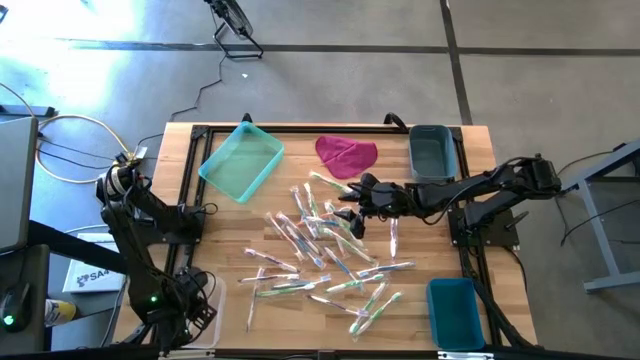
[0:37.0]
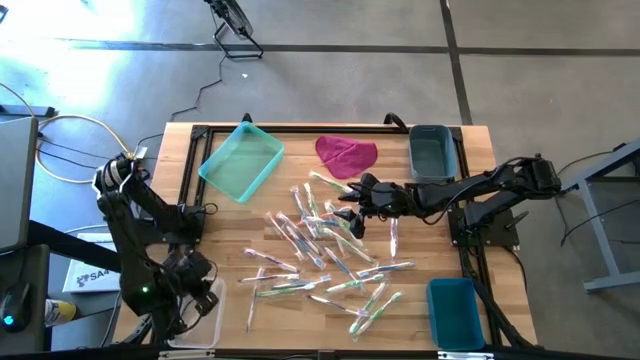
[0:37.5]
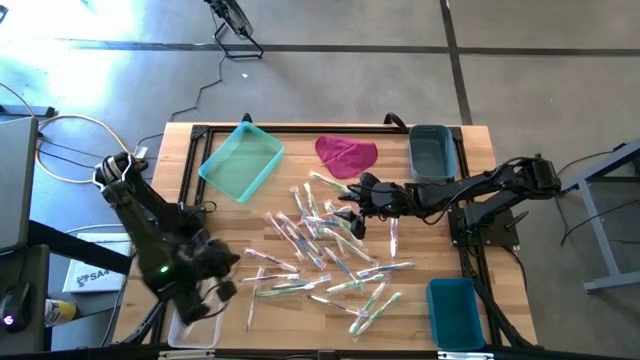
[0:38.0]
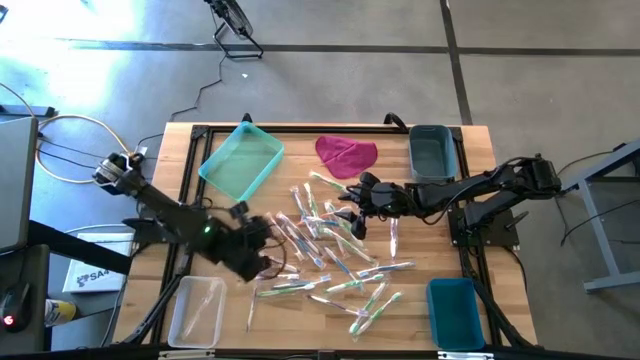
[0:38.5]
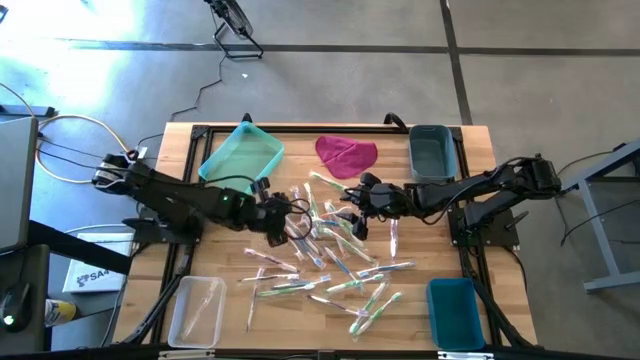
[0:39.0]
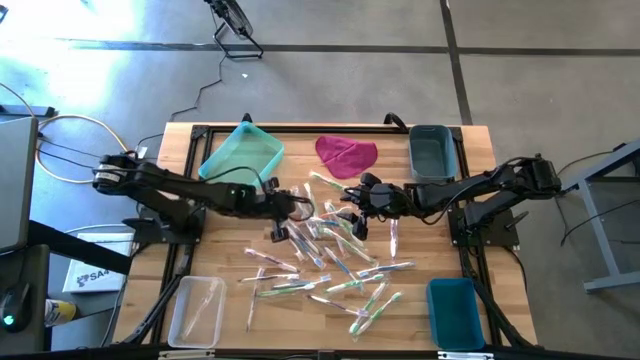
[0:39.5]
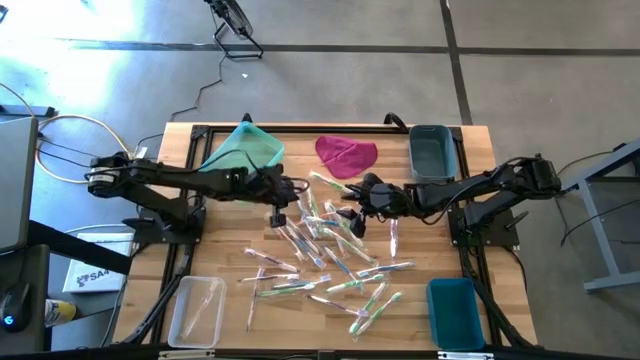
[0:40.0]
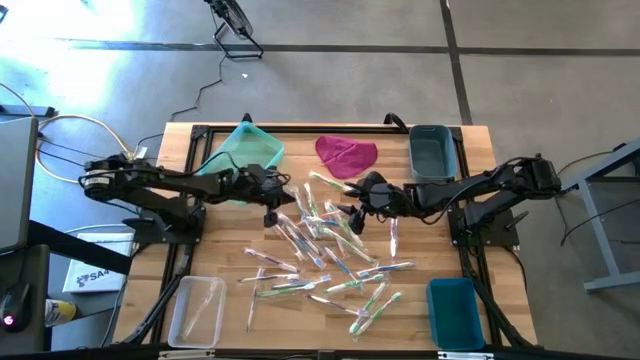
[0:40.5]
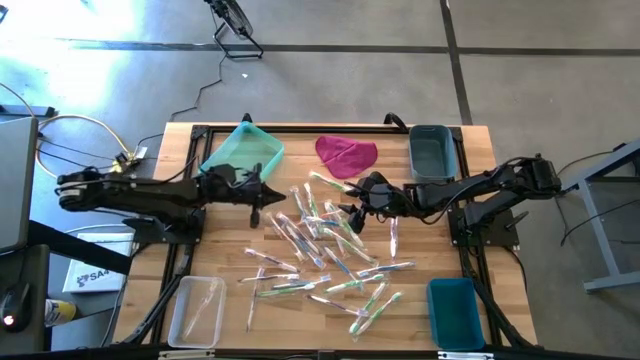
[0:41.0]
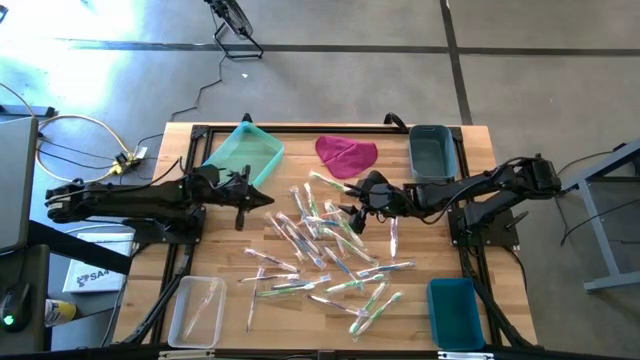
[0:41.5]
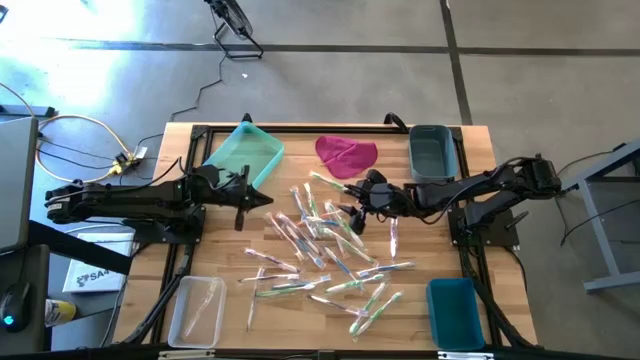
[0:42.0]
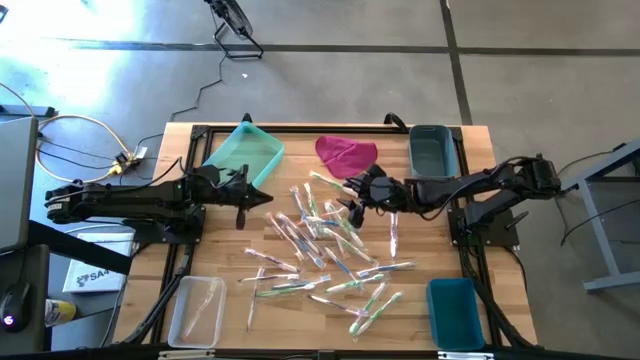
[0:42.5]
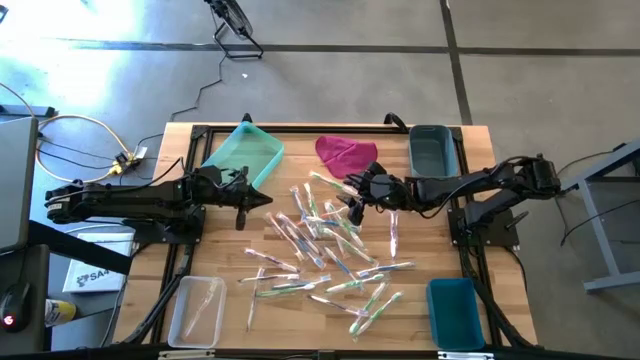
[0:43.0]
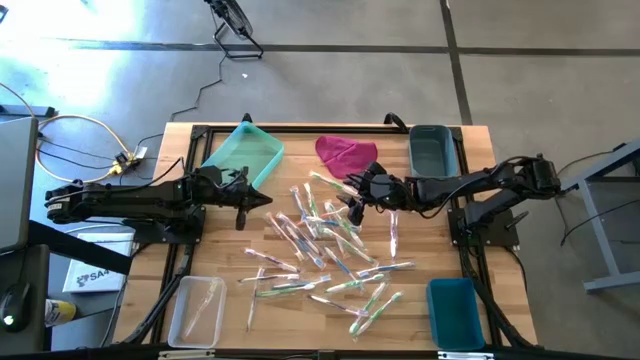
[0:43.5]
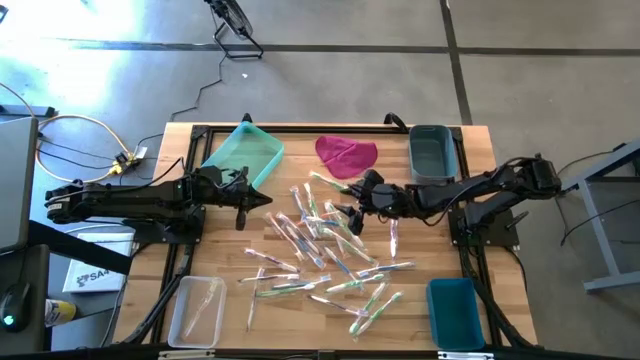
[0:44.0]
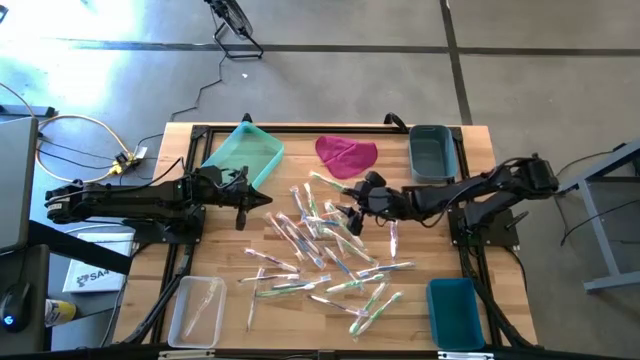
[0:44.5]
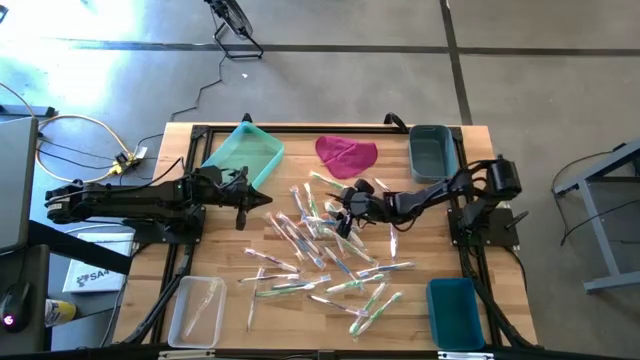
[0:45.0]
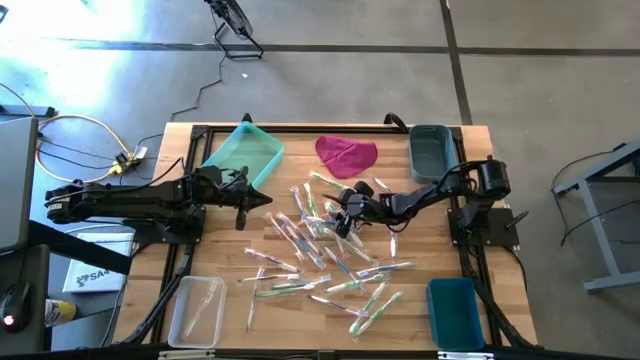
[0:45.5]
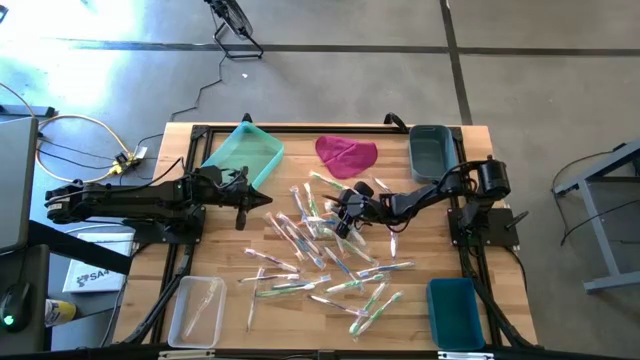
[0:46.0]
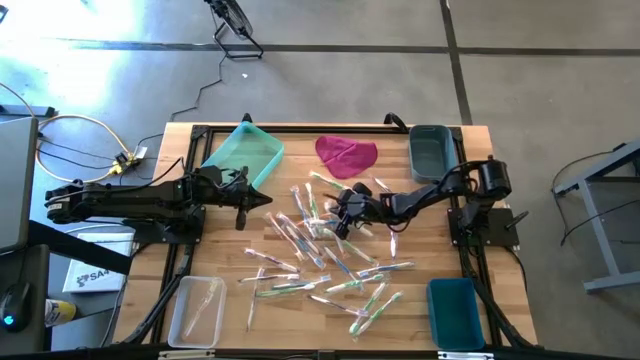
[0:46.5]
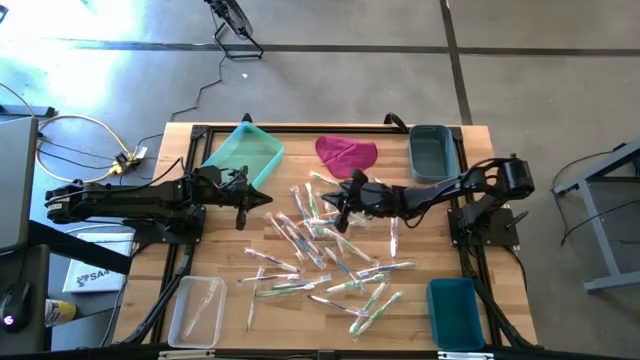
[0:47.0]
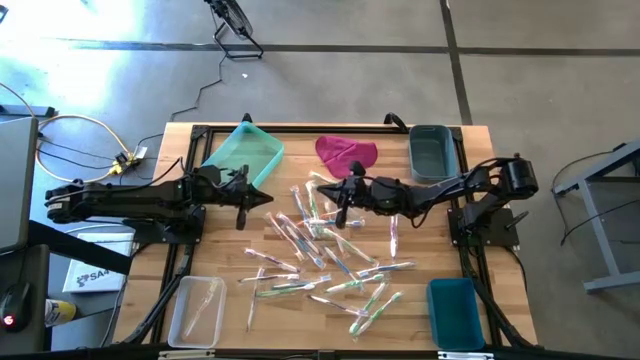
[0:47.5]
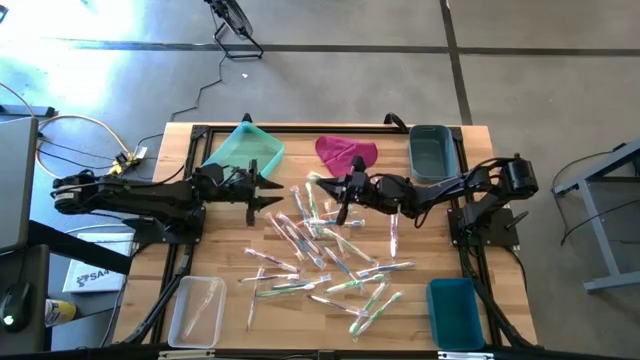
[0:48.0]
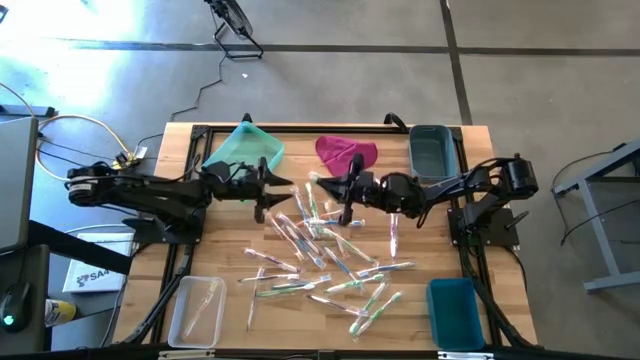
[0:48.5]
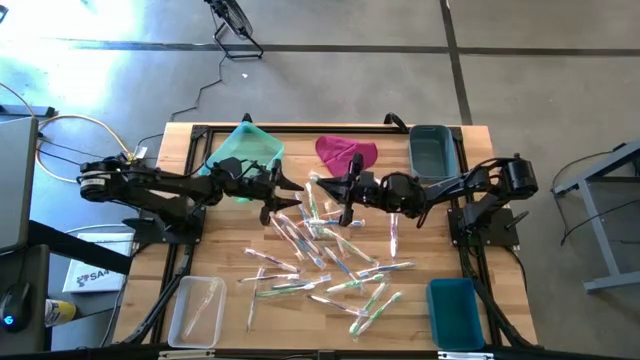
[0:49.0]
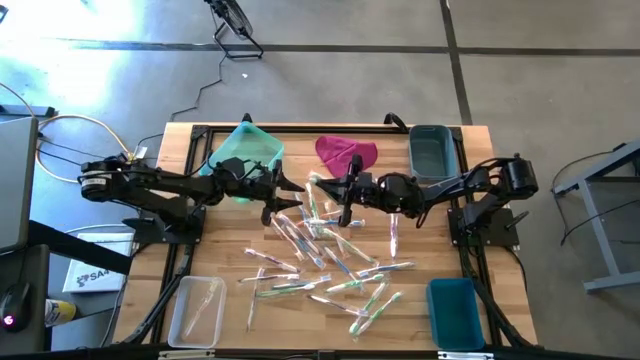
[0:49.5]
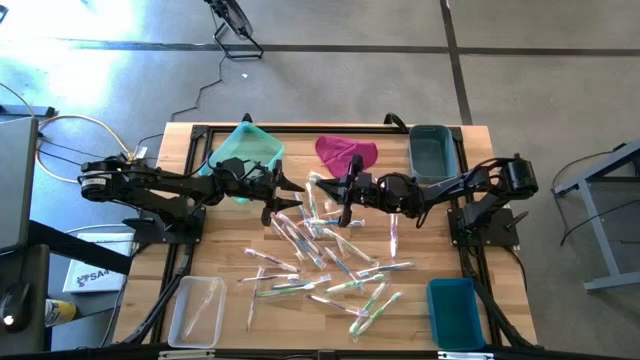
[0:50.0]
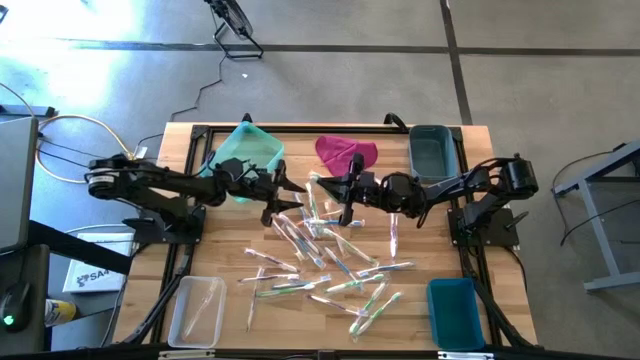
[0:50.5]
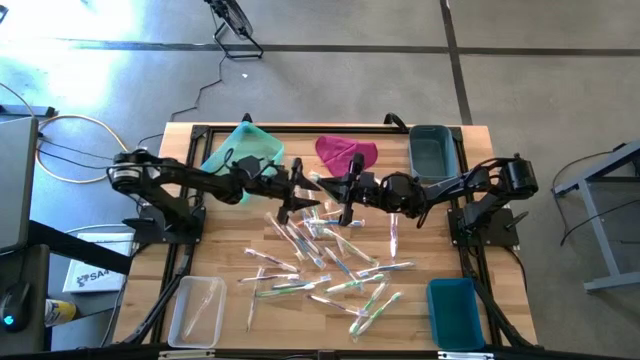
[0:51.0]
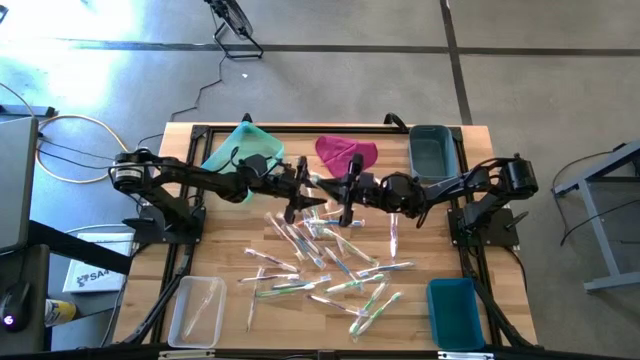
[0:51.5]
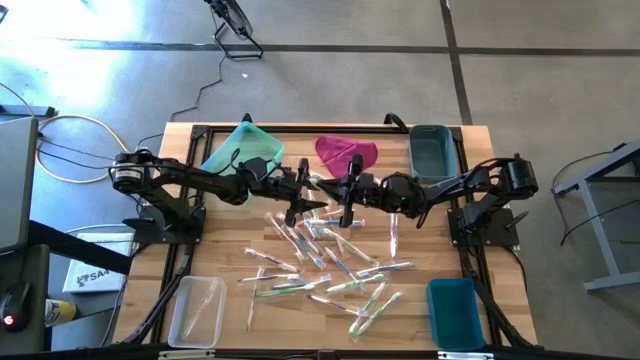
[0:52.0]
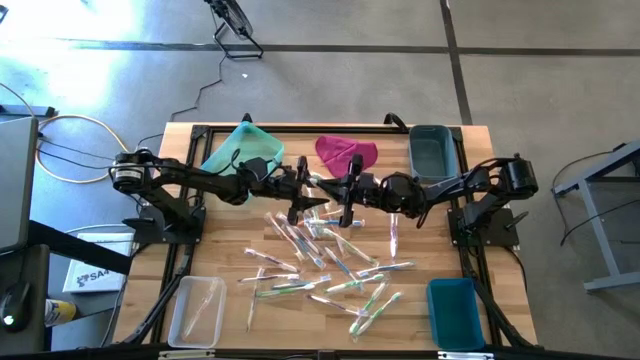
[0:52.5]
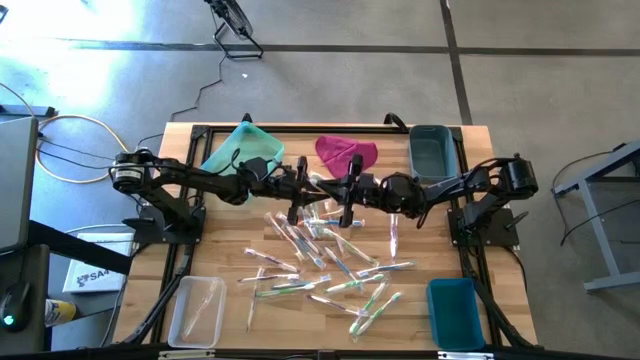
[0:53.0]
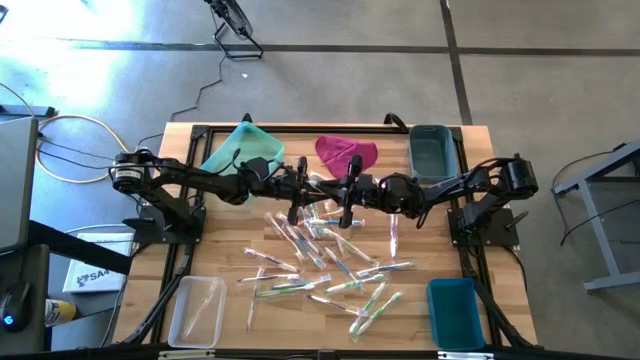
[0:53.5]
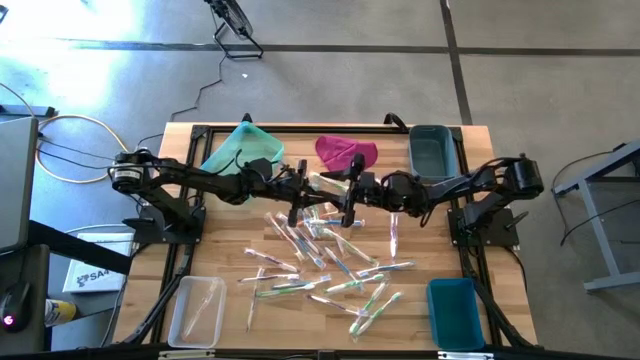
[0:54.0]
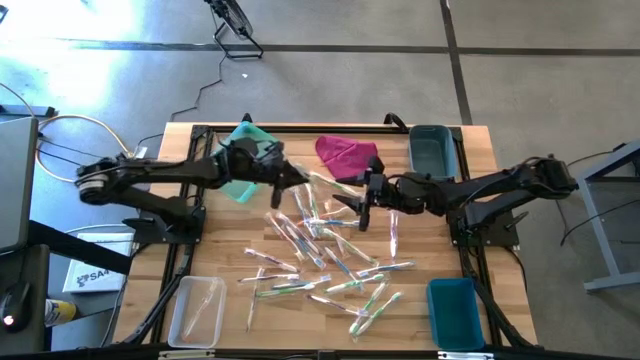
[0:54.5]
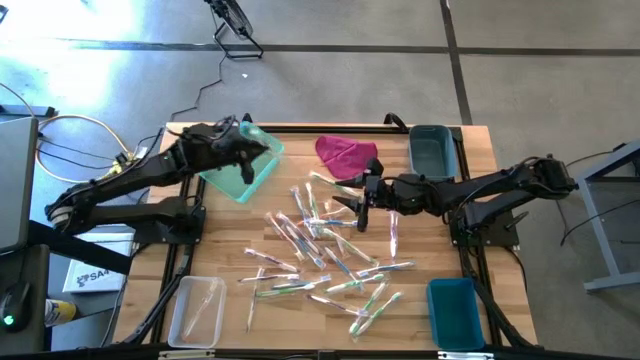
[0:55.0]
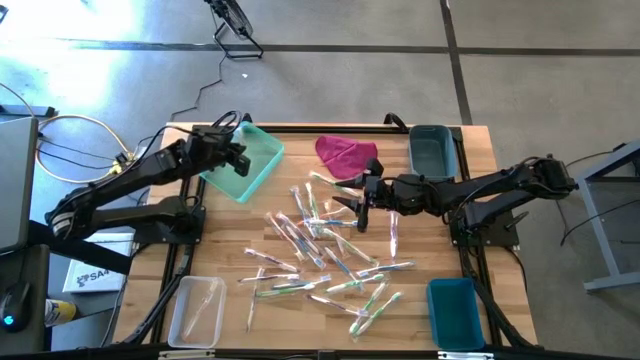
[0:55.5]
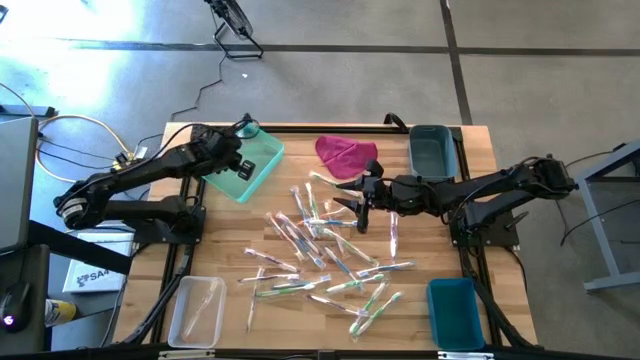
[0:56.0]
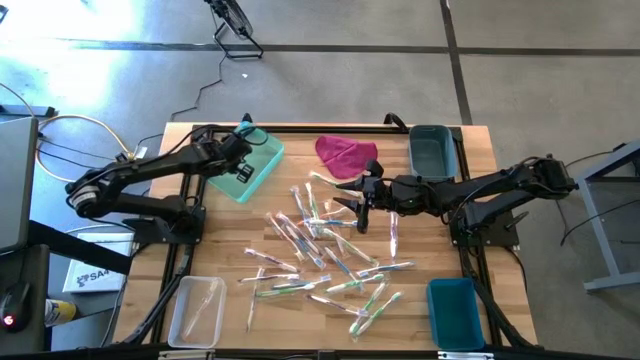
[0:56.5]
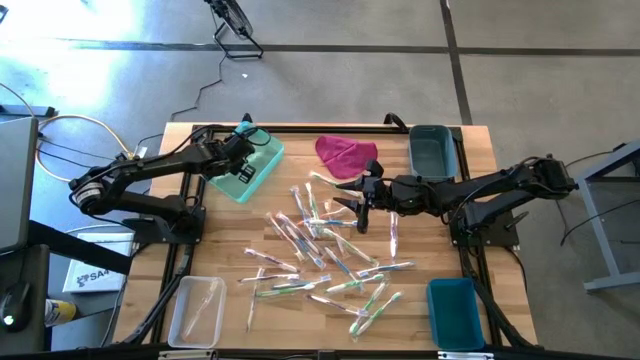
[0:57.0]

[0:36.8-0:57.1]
Task: Pick & Place Toothbrushes
Put the green toothbrush to the green bin
